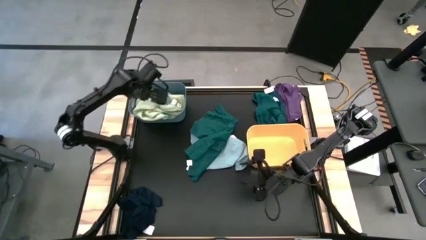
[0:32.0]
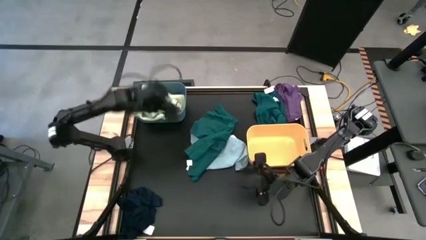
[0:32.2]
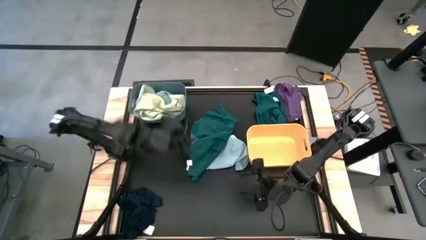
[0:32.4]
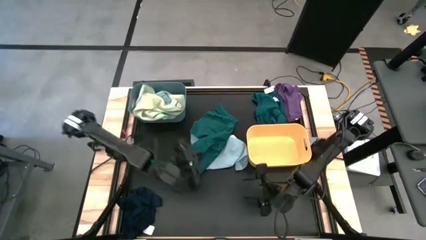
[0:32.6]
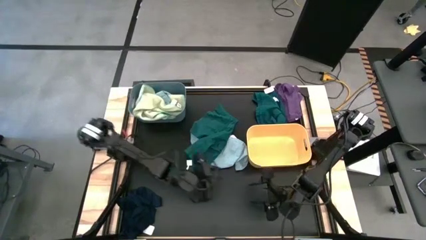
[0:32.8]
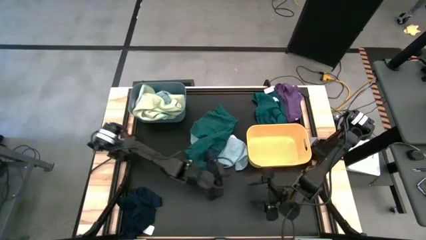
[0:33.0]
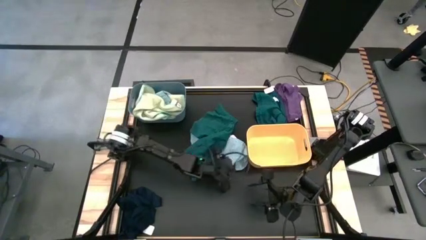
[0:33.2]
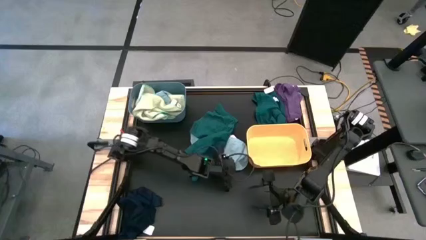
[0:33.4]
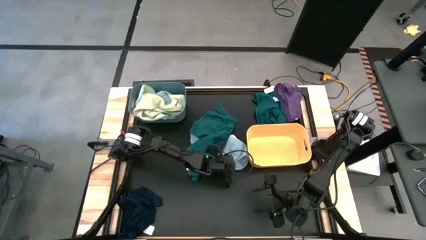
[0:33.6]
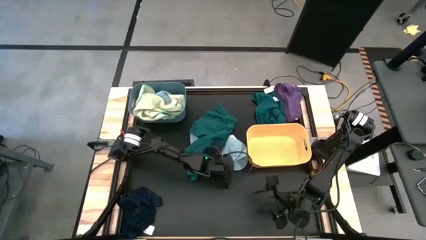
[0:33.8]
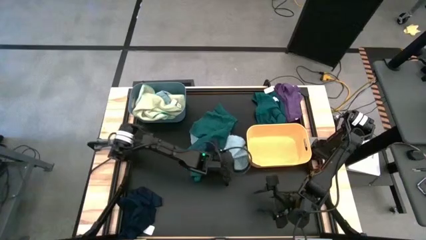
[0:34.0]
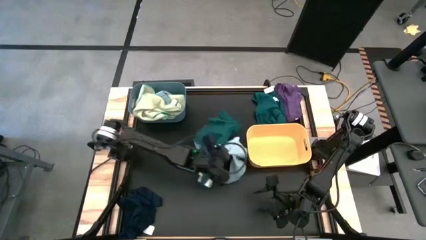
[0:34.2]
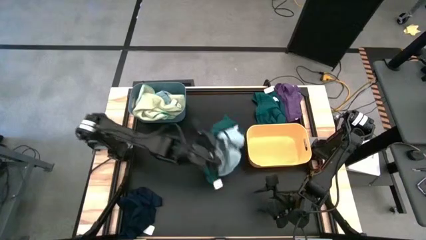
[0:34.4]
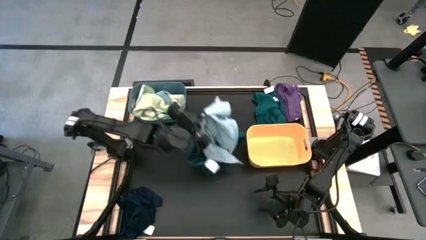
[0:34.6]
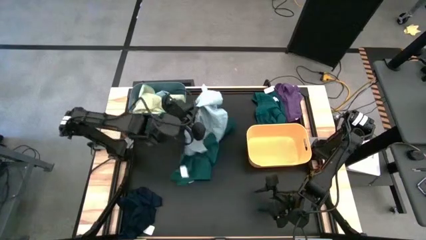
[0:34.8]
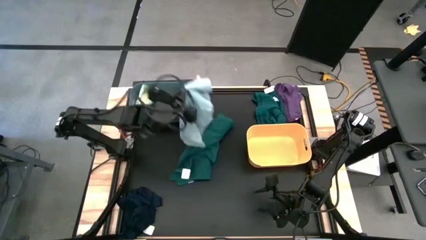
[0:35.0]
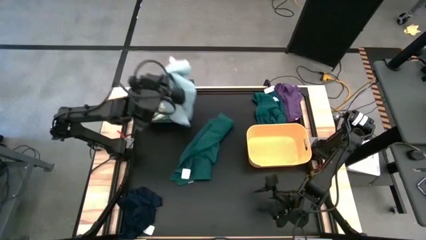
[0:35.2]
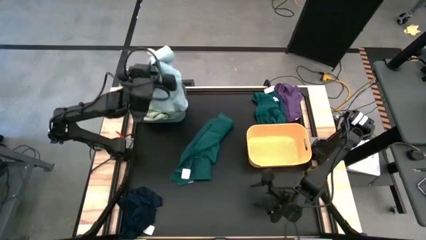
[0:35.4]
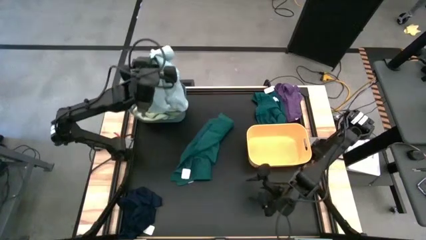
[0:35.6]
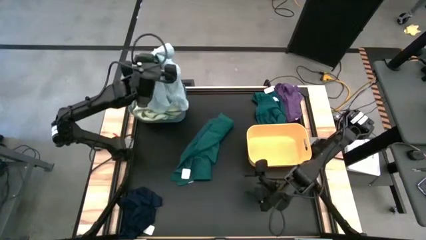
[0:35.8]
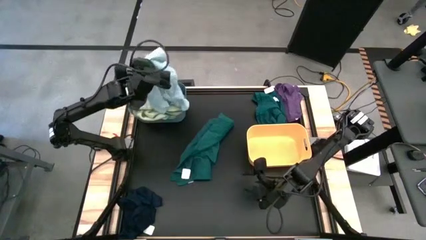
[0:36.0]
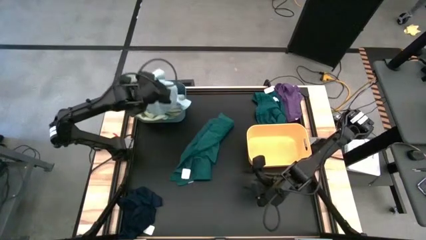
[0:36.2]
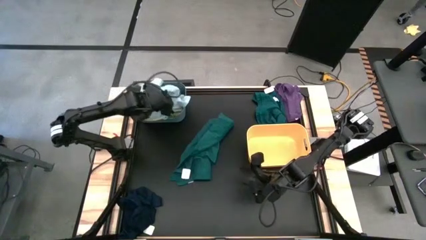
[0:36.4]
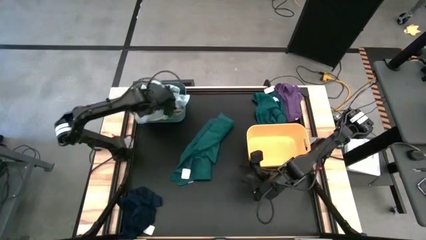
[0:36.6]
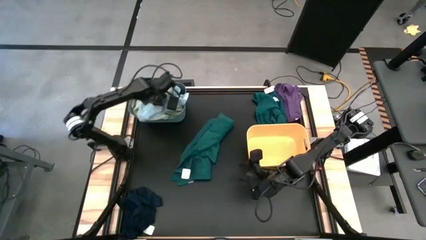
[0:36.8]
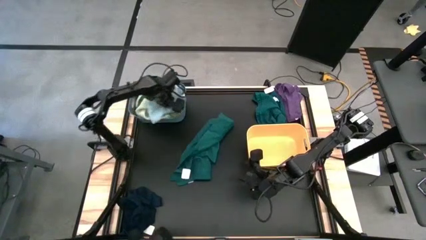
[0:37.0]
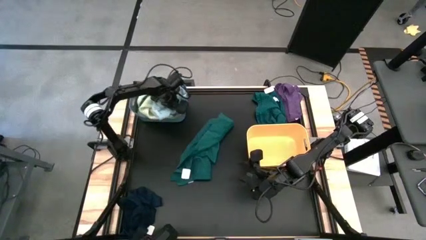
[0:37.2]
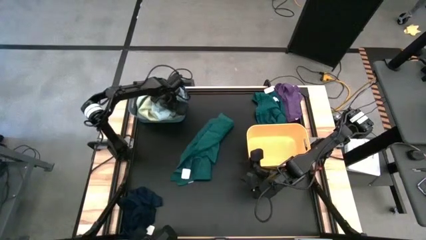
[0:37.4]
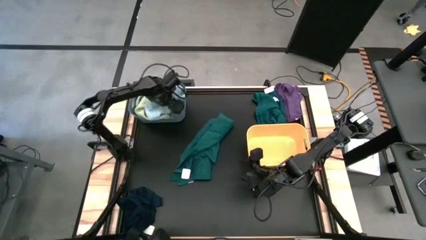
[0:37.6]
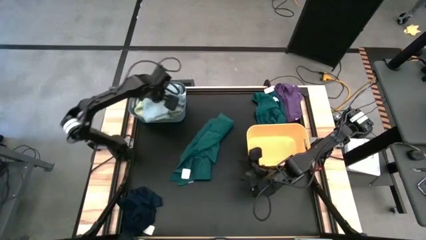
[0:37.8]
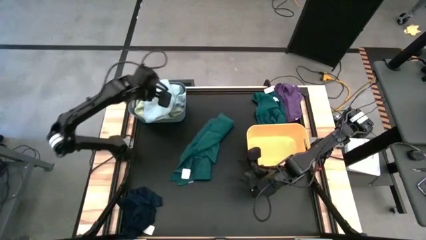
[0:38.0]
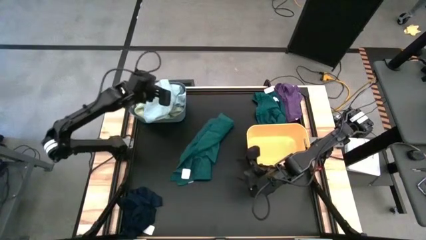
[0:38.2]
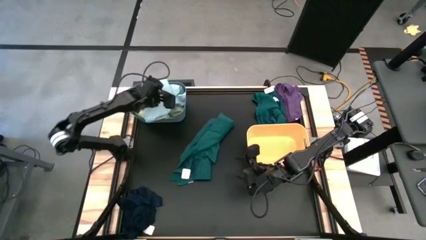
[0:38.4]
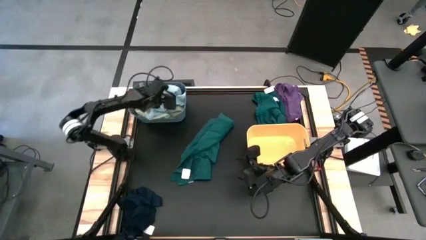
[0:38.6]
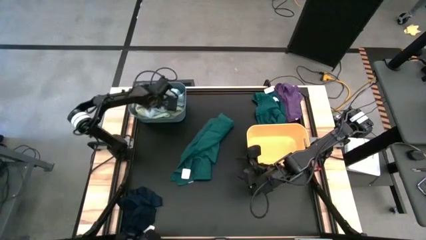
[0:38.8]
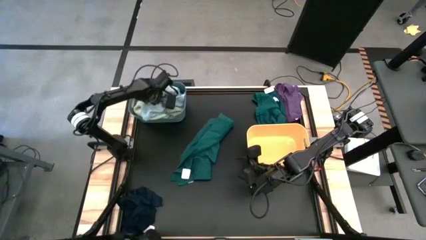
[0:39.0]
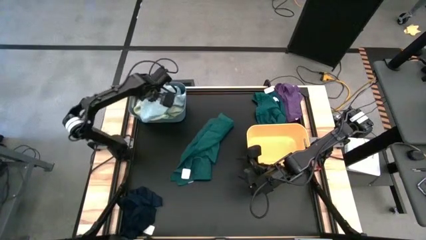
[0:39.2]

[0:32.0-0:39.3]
Task: Sort towels by color in basket
Put the light blue towel into the blue bin

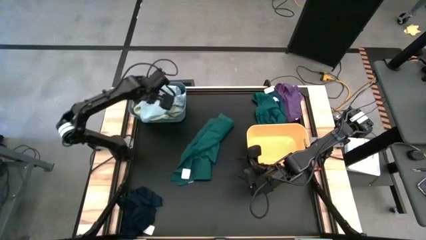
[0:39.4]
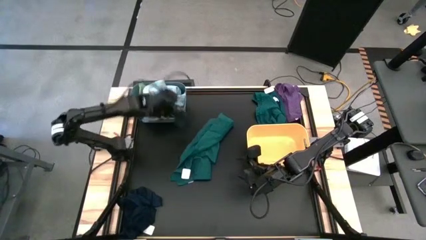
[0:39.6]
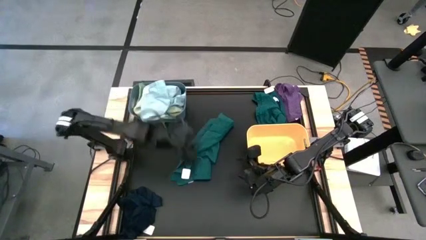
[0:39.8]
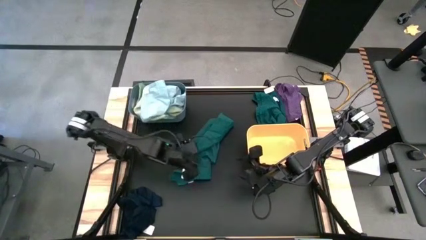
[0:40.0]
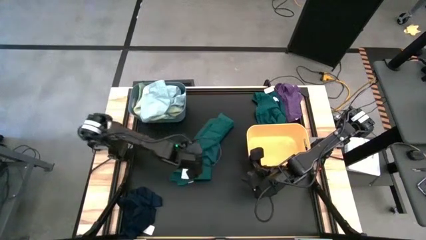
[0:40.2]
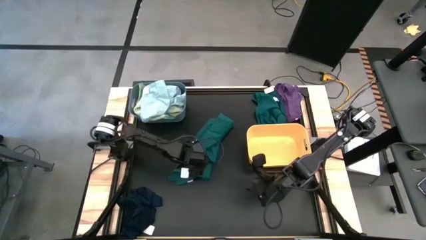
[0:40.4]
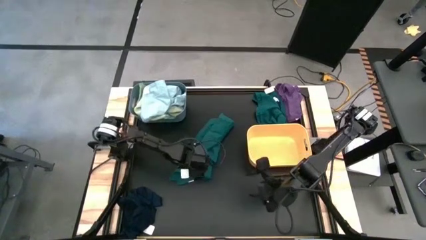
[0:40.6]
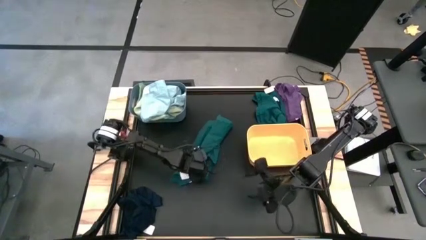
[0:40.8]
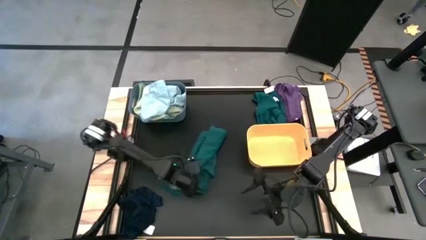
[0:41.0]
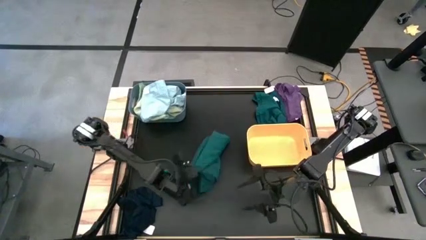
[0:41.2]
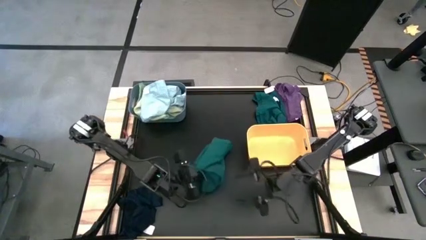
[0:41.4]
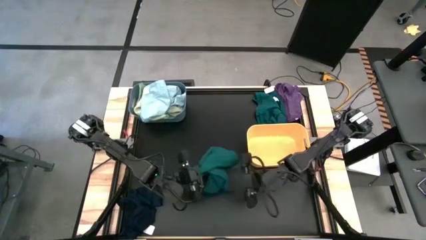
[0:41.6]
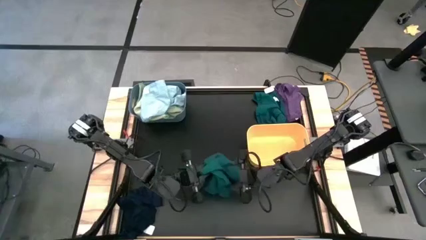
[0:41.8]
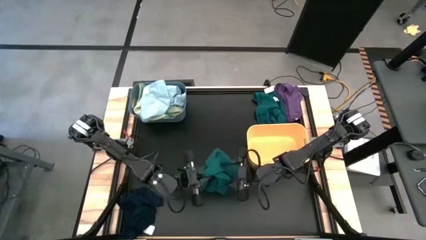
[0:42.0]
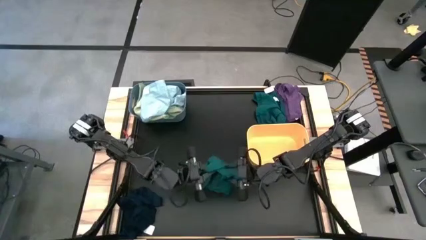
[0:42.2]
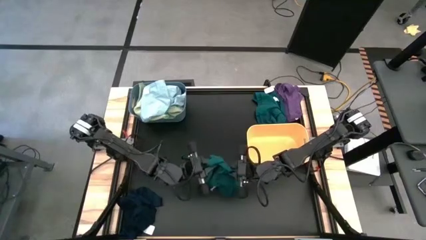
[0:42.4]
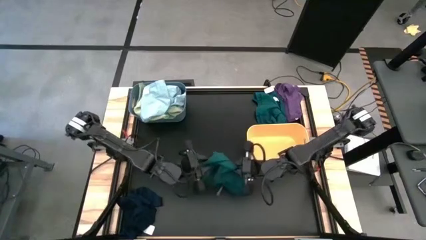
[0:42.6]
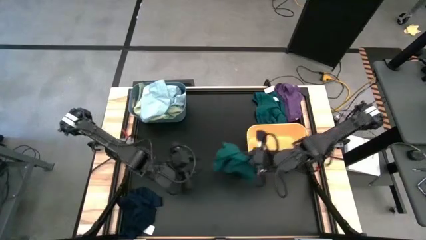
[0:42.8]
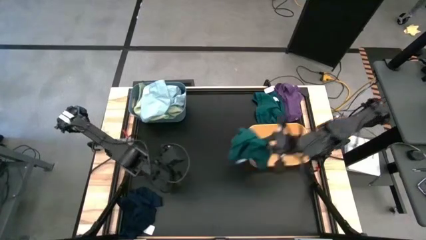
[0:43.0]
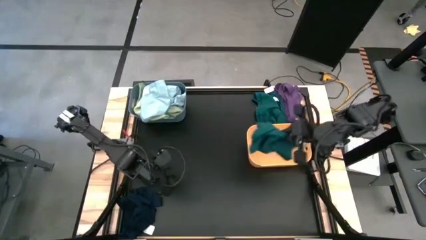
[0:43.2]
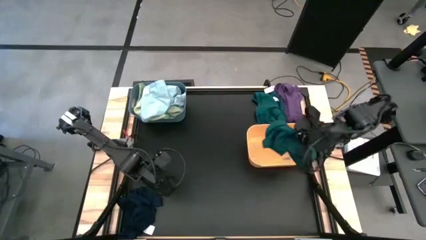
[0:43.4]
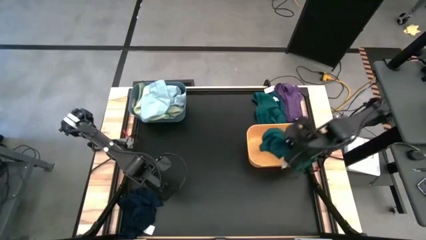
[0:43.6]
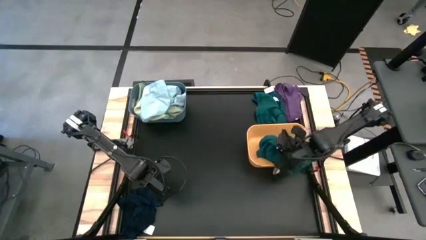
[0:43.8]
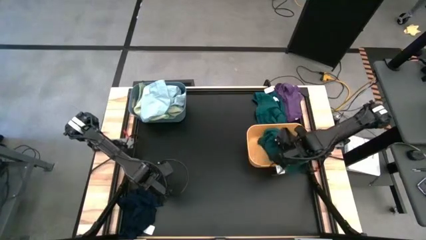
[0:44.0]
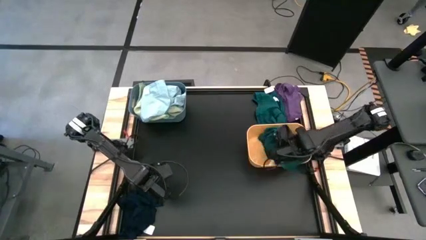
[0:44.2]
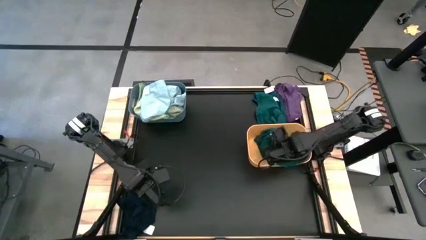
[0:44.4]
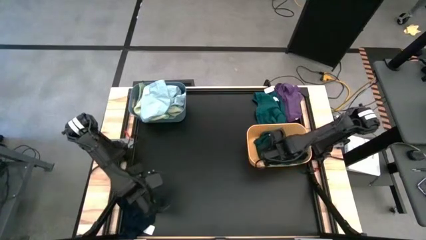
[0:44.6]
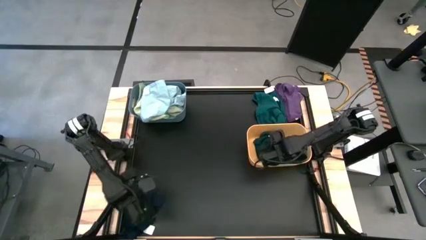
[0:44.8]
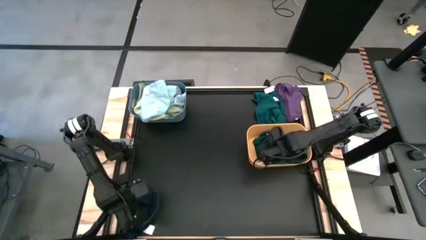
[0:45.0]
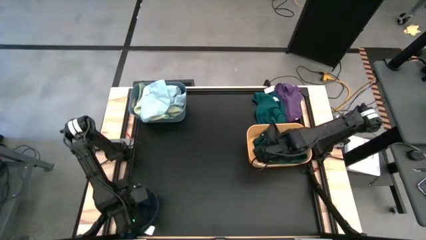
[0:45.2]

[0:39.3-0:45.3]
Put the left green towel into the yellow bin

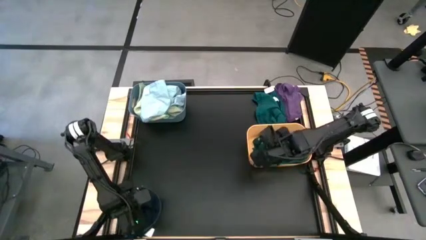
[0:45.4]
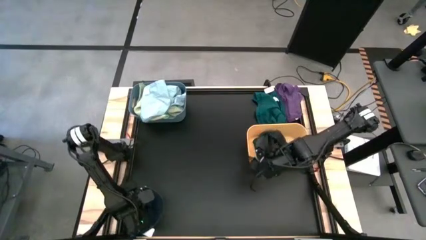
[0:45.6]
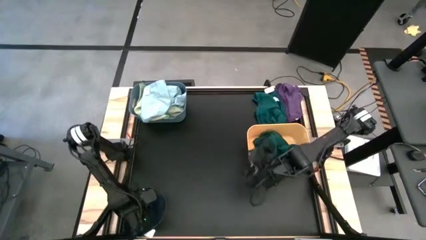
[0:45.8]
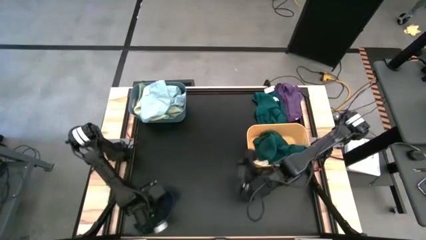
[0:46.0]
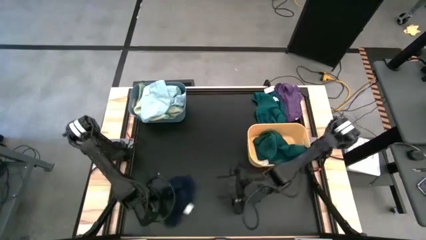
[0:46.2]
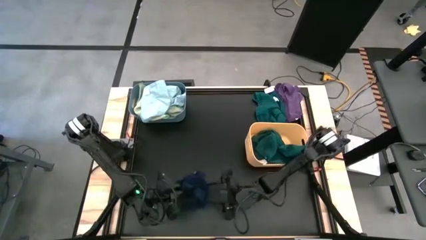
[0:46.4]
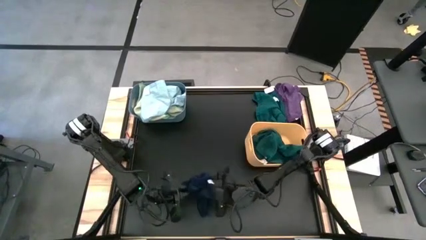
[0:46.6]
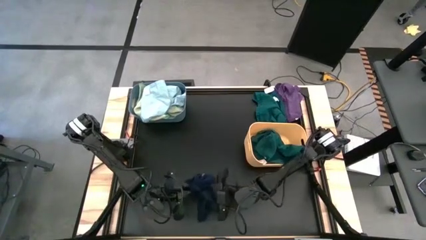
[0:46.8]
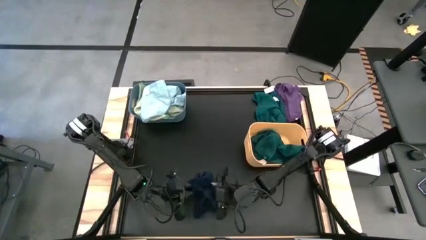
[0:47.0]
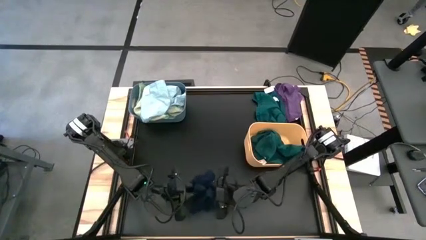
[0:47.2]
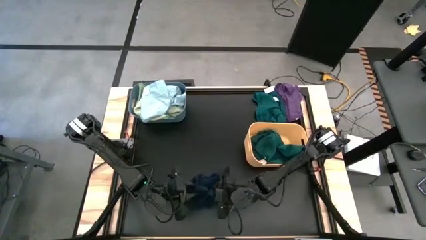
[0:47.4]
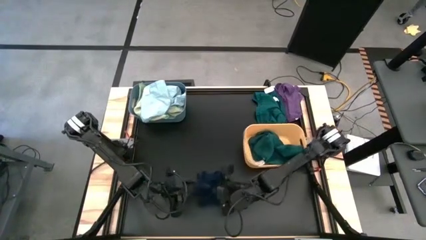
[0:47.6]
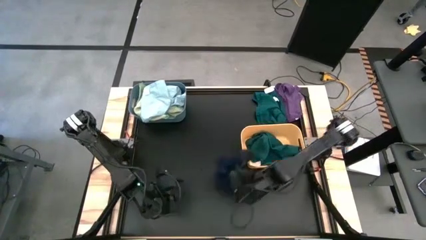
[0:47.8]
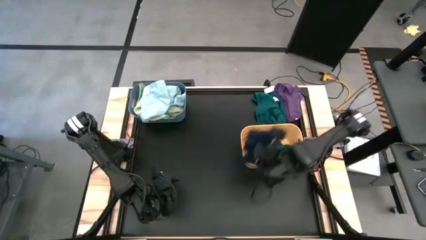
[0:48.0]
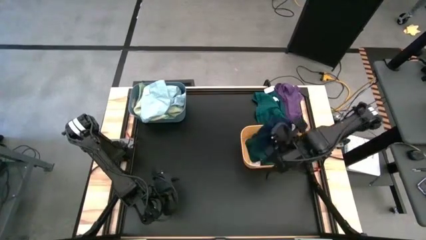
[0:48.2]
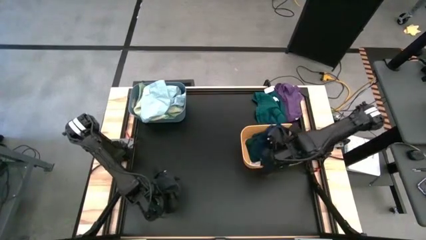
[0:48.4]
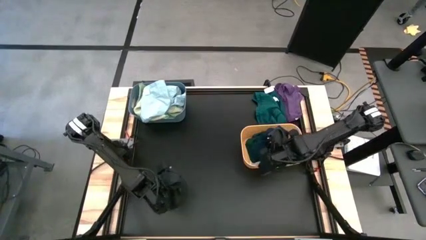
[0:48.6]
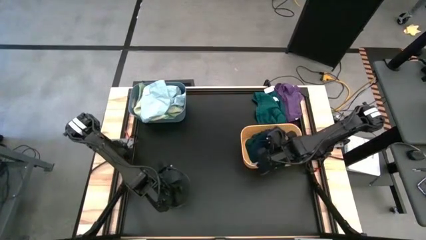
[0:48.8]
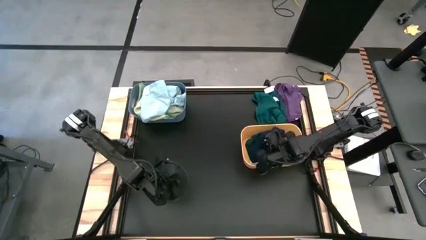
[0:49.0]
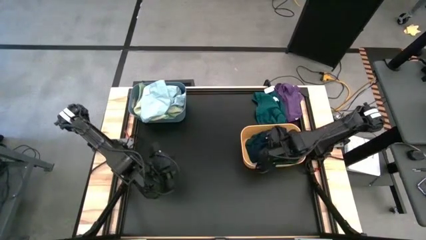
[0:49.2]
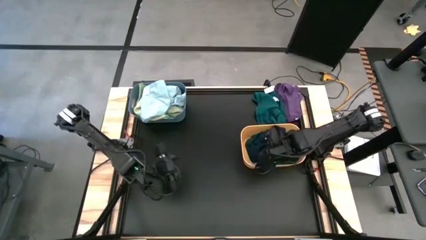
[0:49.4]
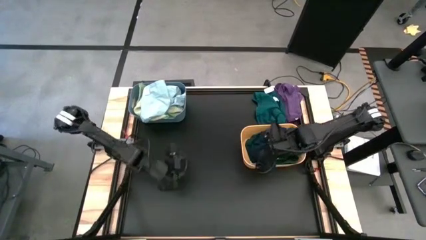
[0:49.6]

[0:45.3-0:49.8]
Put the dark blue towel into the yellow bin
